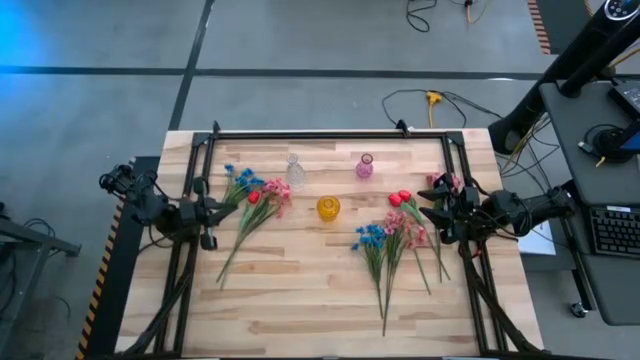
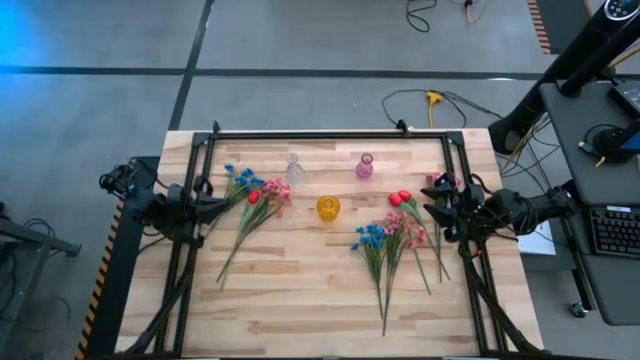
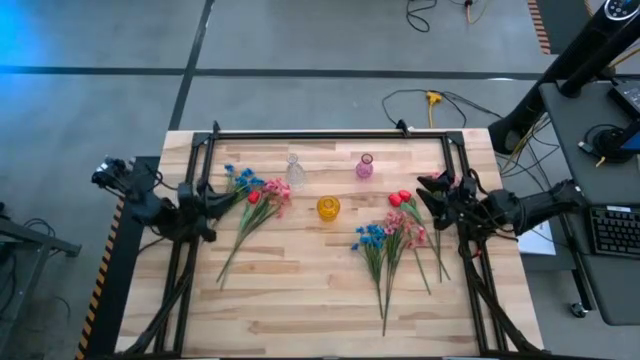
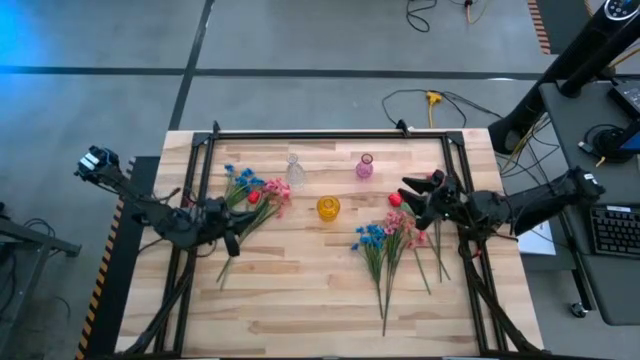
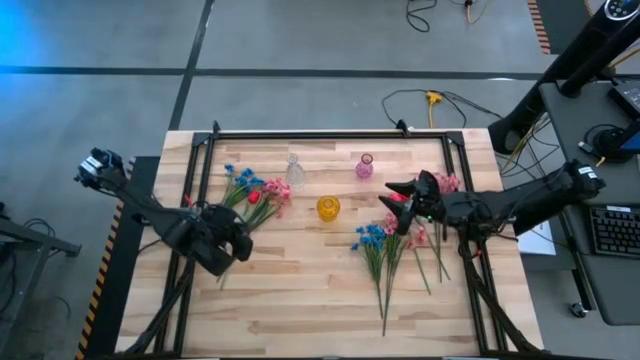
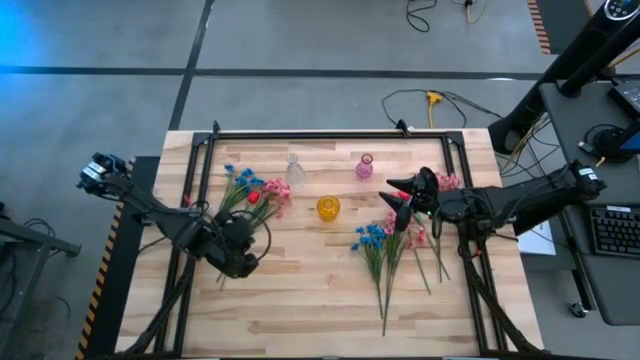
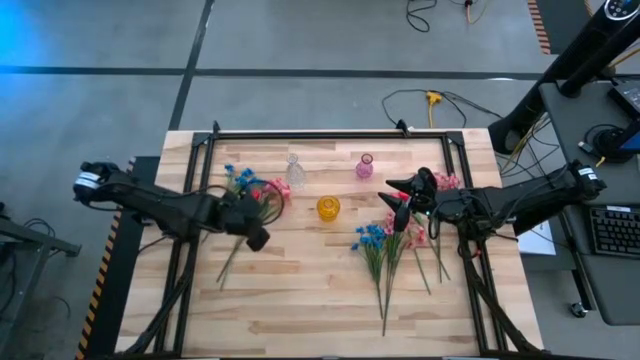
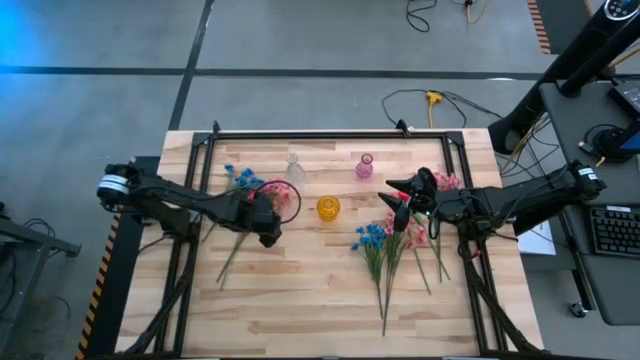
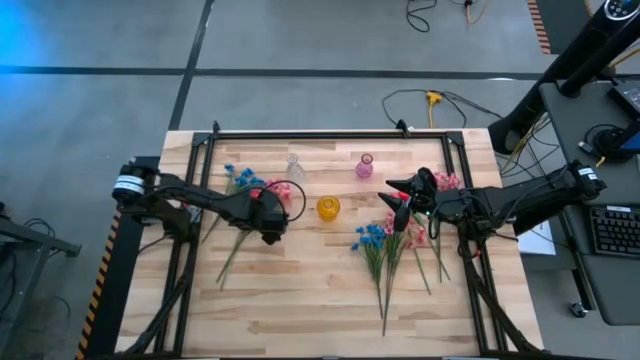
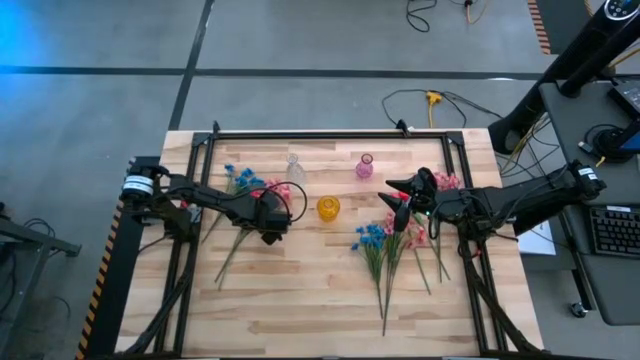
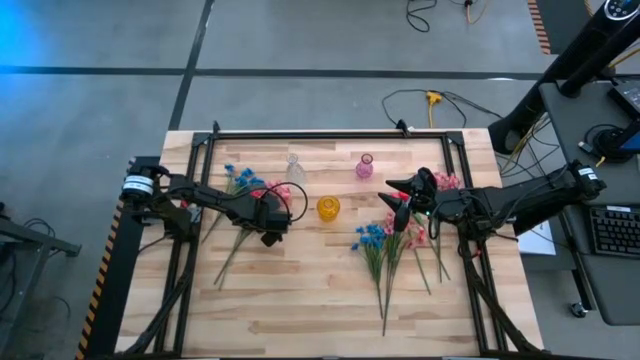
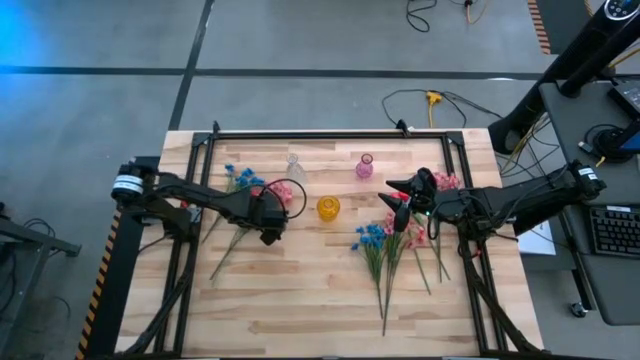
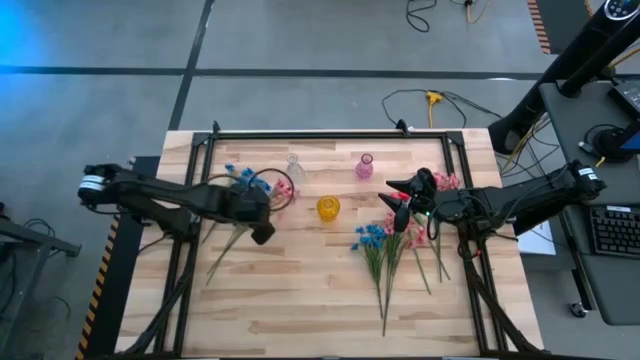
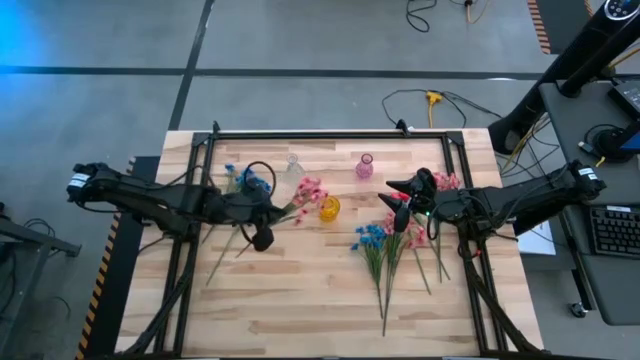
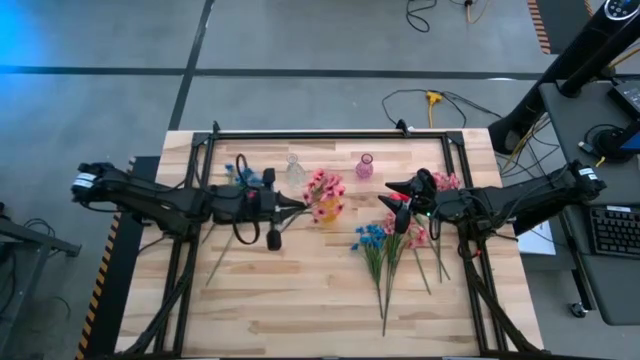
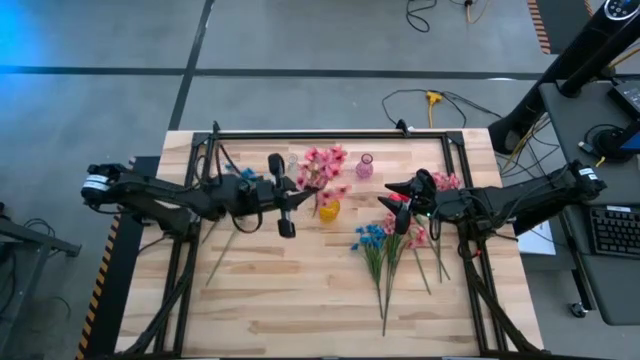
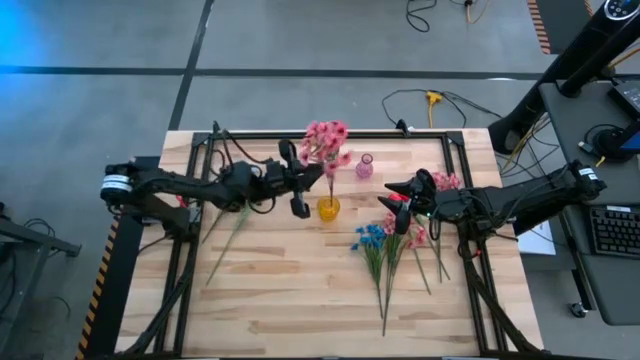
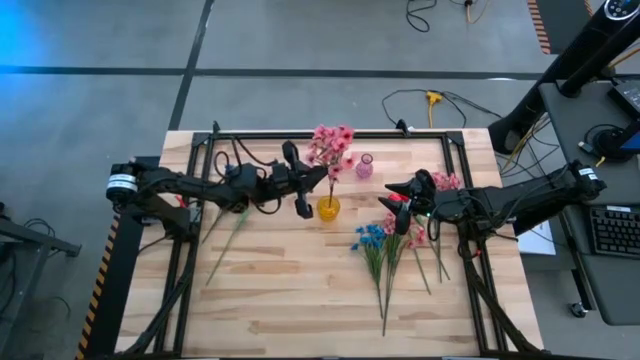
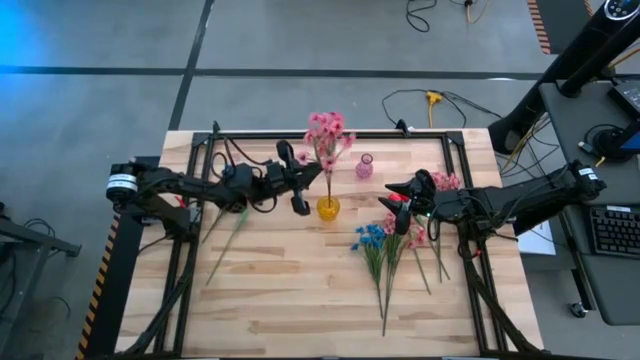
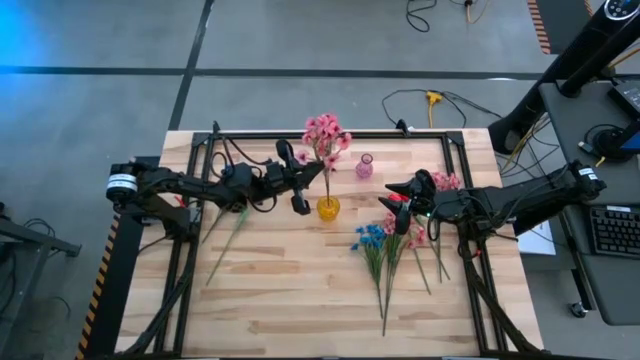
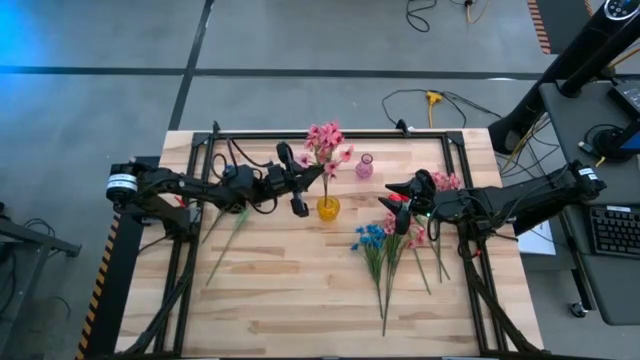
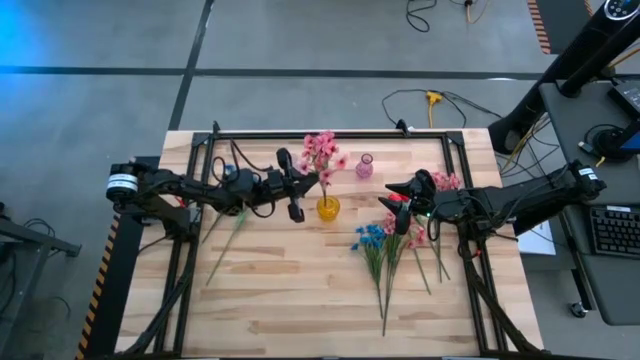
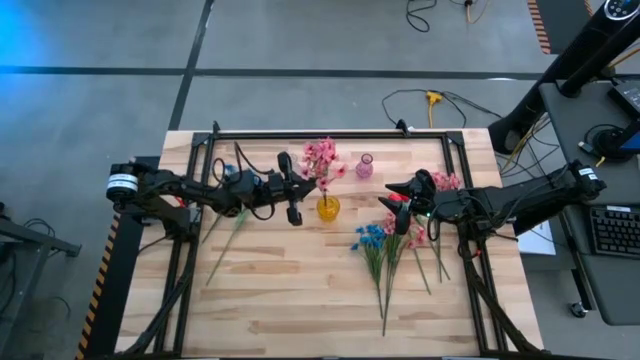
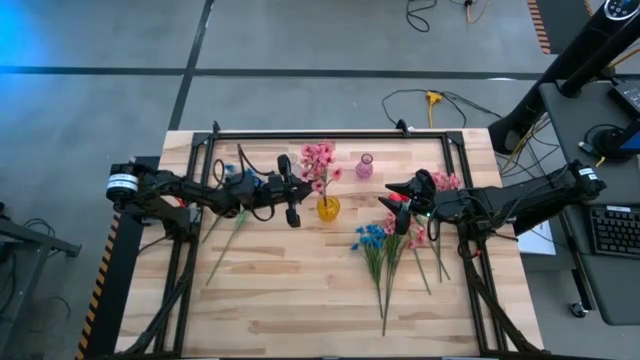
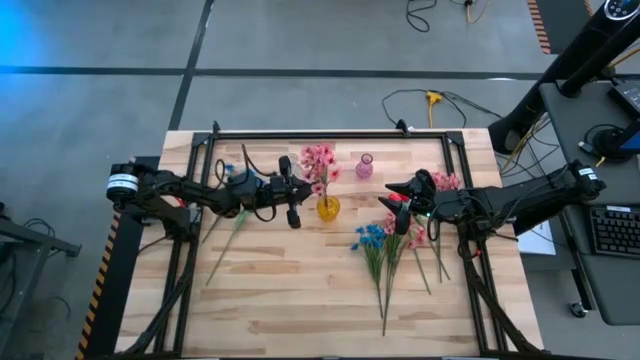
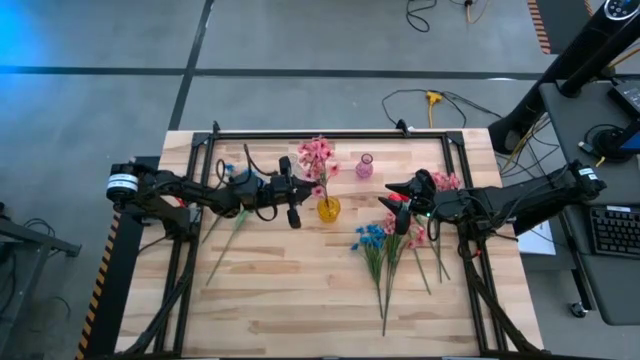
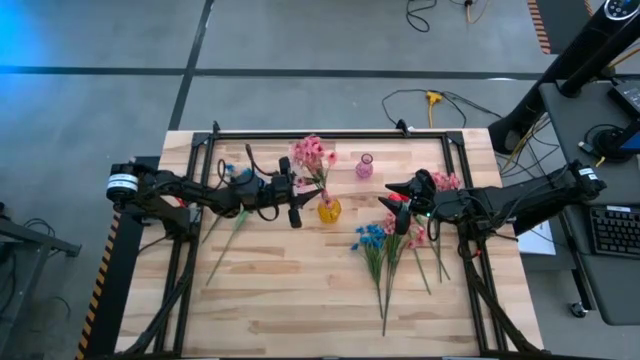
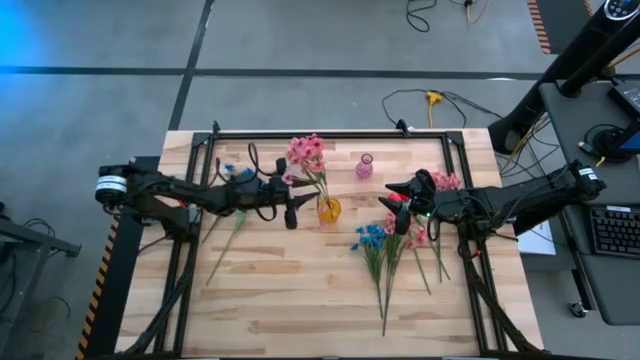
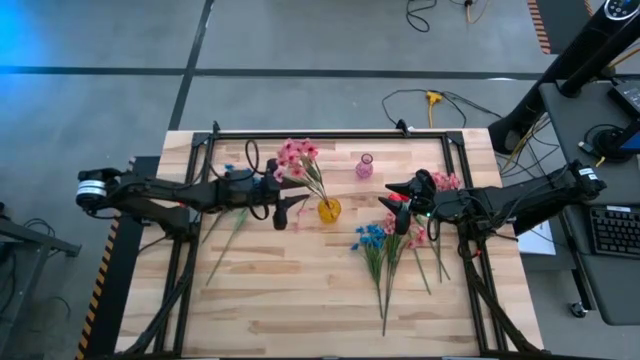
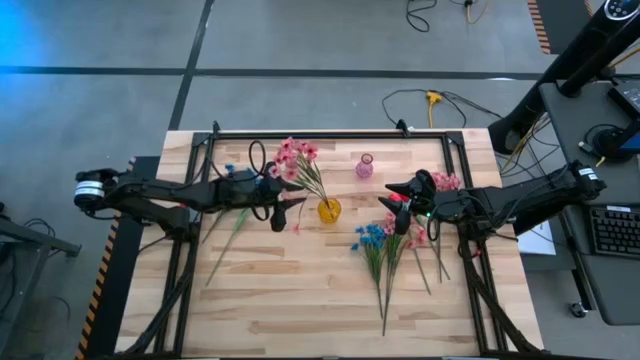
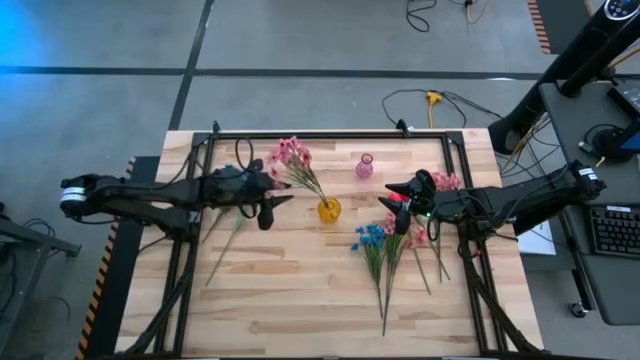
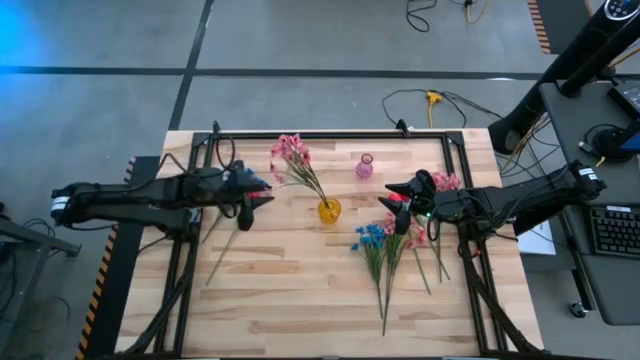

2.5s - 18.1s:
Task: Sort flowers into vase by color
Put the left pink flowers into the yellow vase
